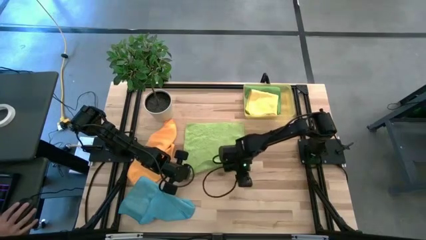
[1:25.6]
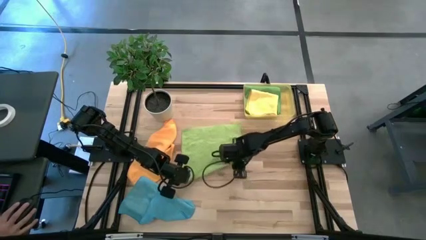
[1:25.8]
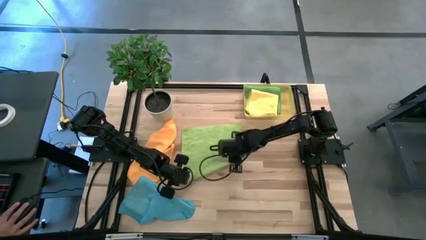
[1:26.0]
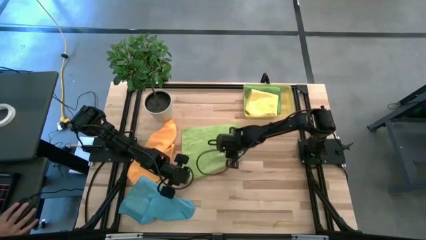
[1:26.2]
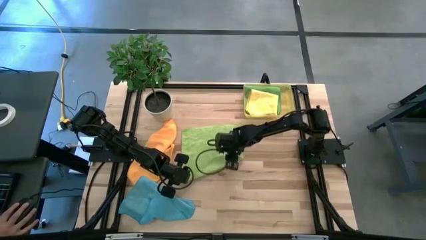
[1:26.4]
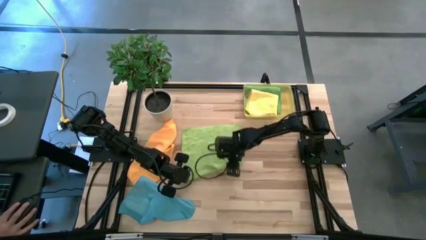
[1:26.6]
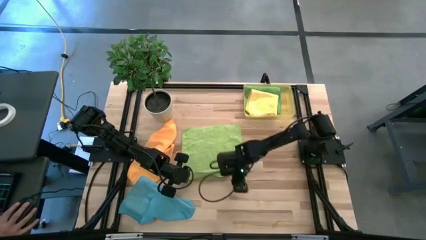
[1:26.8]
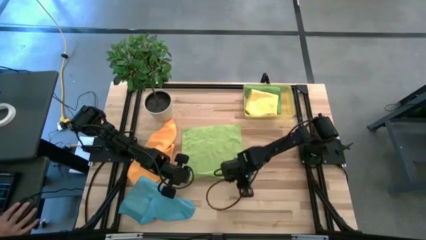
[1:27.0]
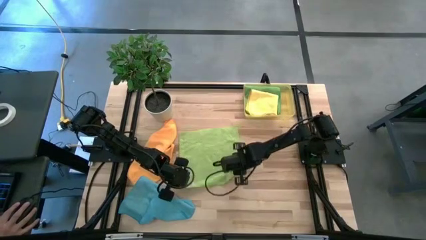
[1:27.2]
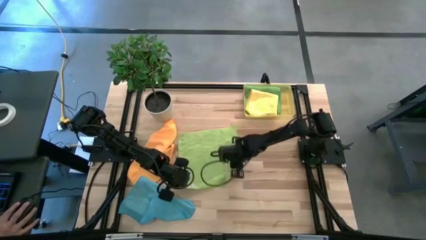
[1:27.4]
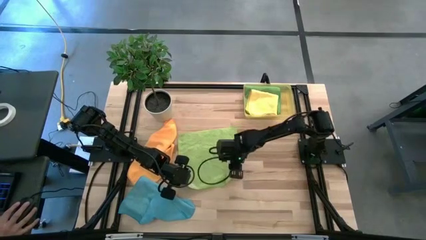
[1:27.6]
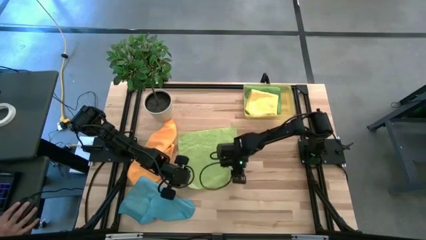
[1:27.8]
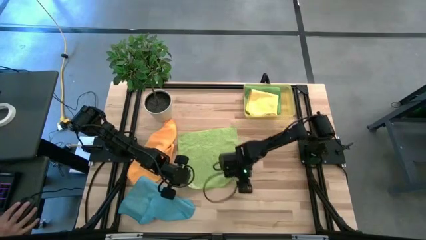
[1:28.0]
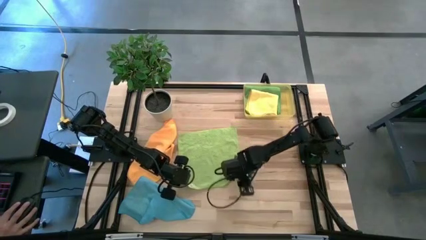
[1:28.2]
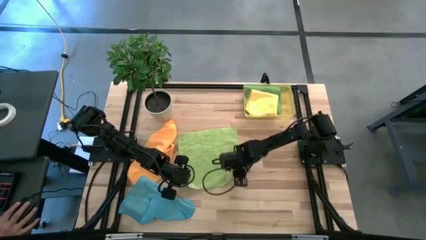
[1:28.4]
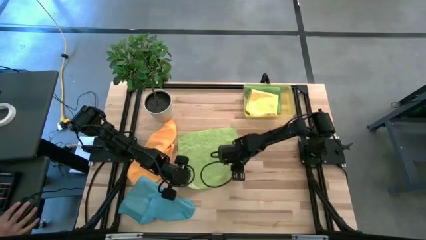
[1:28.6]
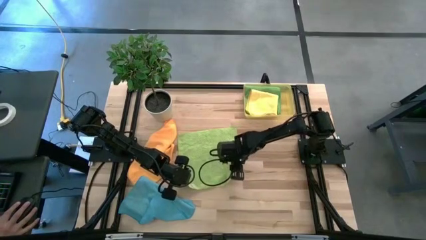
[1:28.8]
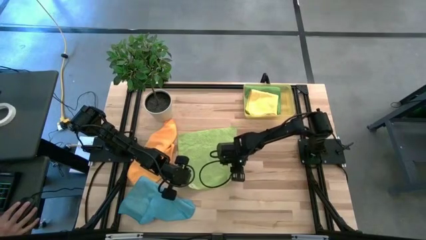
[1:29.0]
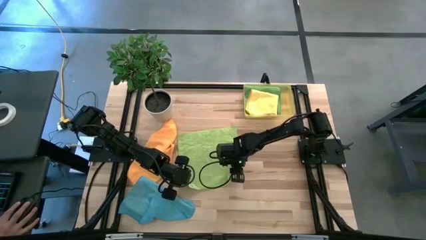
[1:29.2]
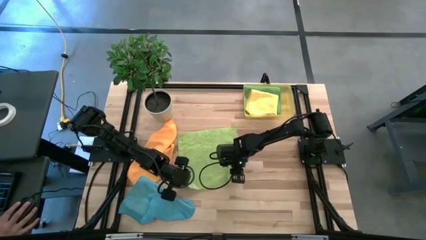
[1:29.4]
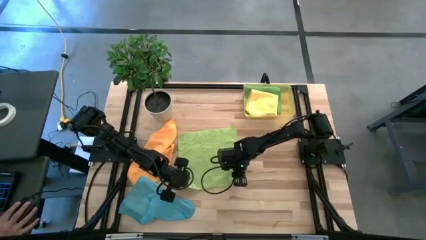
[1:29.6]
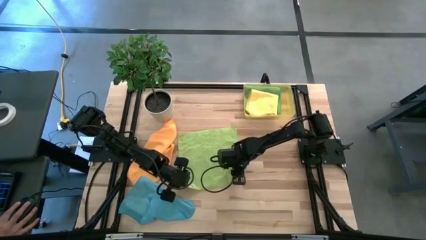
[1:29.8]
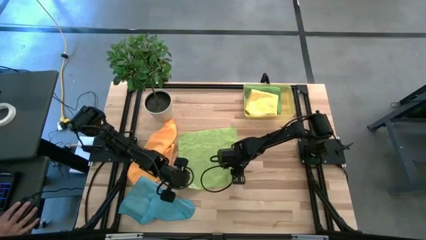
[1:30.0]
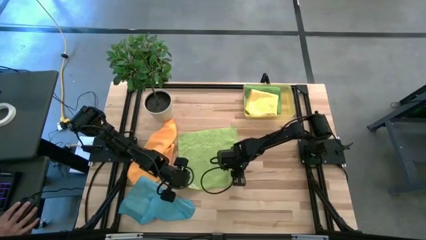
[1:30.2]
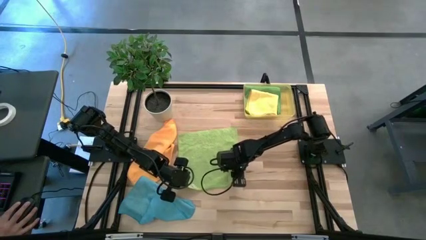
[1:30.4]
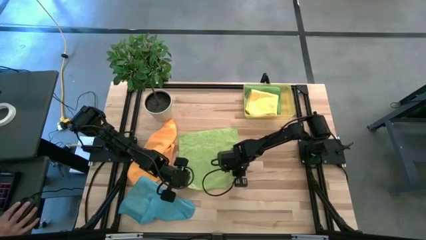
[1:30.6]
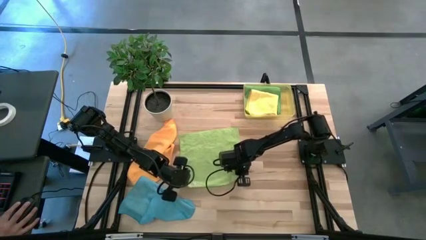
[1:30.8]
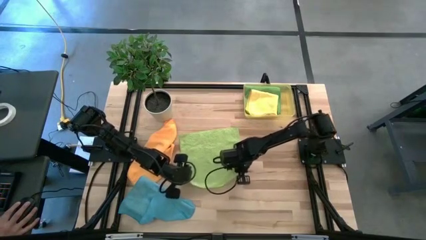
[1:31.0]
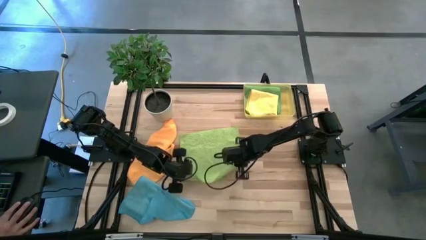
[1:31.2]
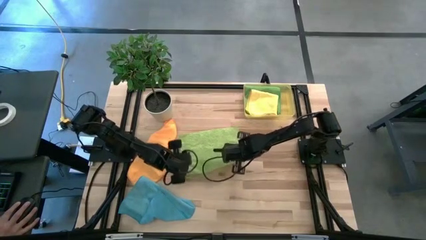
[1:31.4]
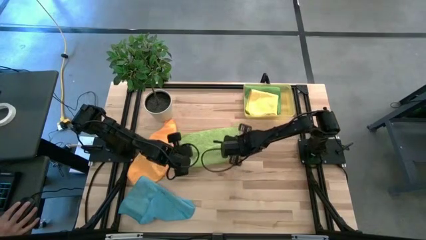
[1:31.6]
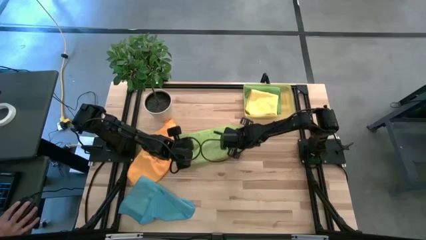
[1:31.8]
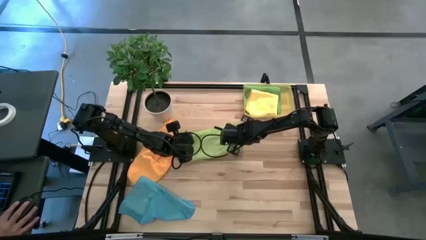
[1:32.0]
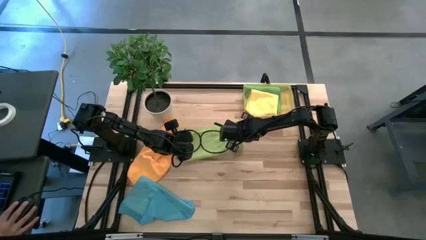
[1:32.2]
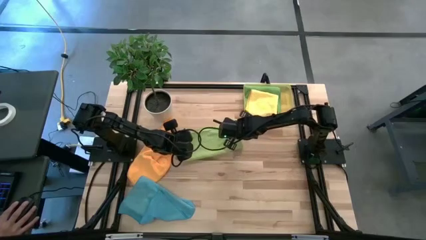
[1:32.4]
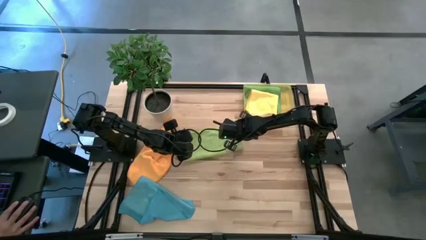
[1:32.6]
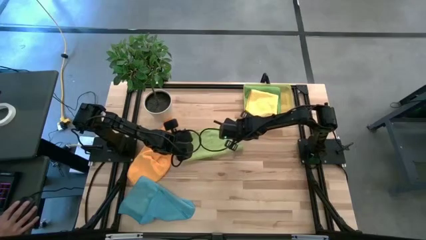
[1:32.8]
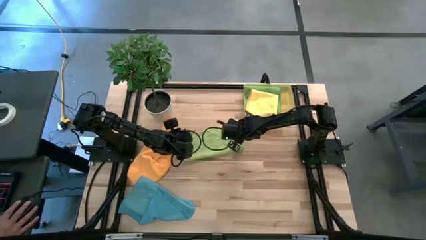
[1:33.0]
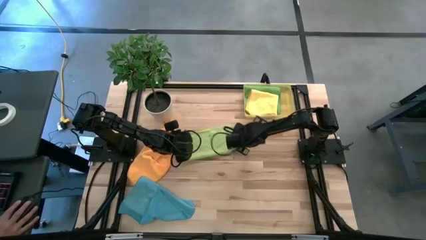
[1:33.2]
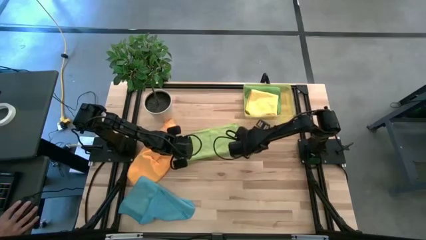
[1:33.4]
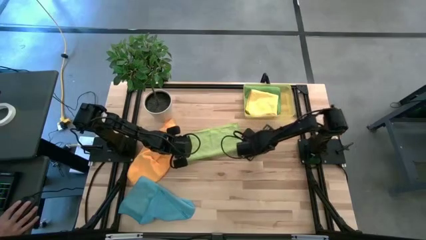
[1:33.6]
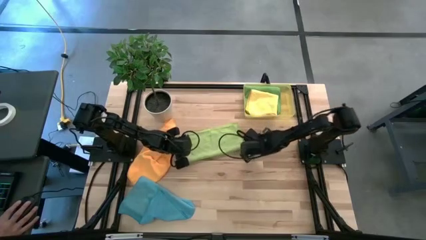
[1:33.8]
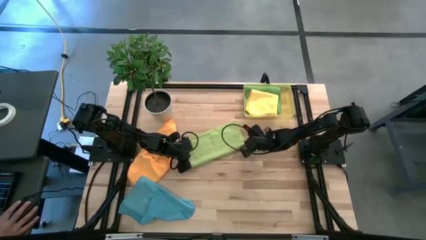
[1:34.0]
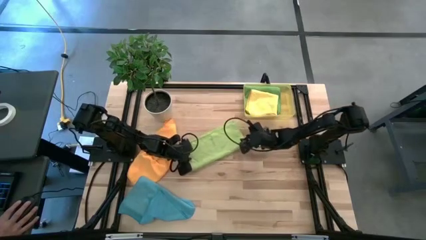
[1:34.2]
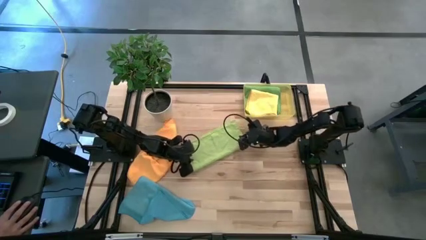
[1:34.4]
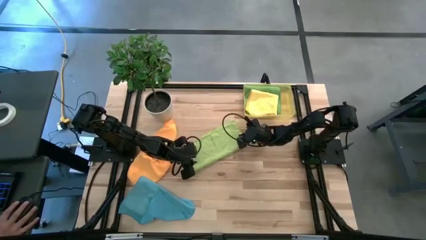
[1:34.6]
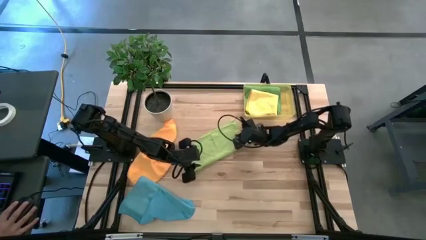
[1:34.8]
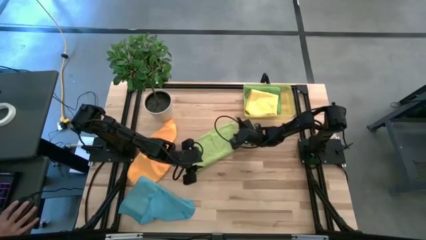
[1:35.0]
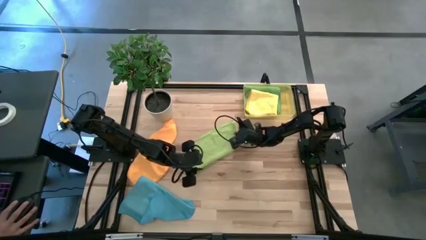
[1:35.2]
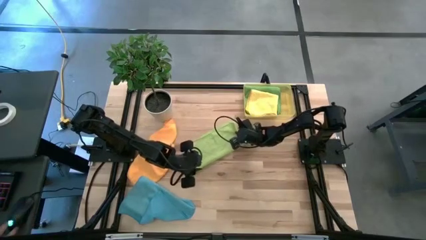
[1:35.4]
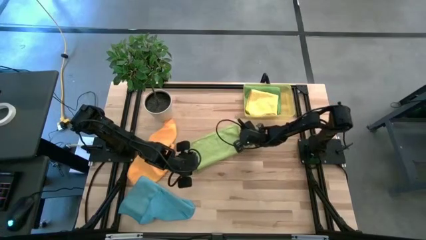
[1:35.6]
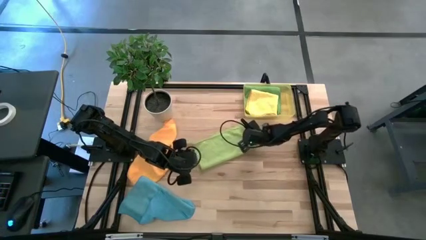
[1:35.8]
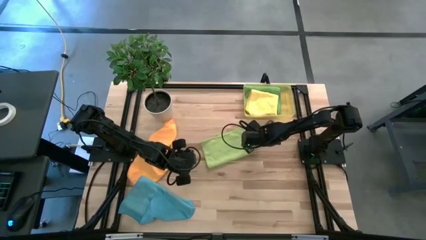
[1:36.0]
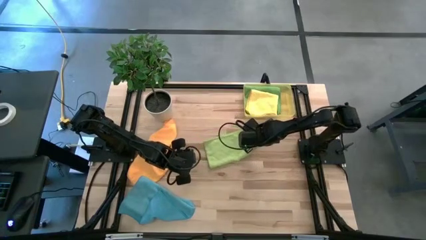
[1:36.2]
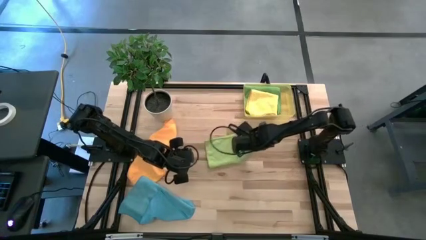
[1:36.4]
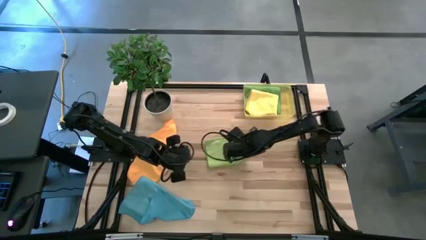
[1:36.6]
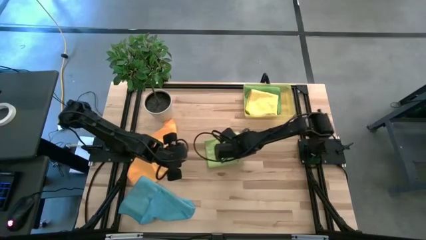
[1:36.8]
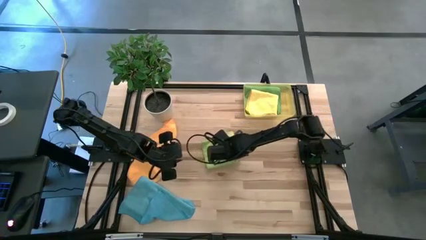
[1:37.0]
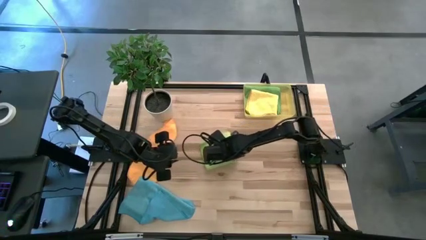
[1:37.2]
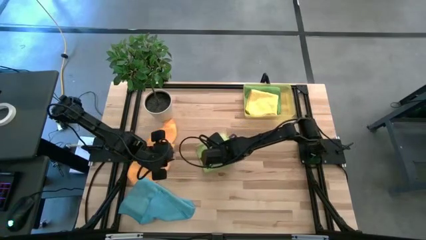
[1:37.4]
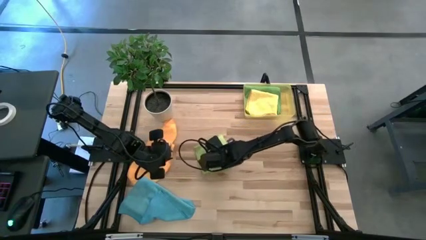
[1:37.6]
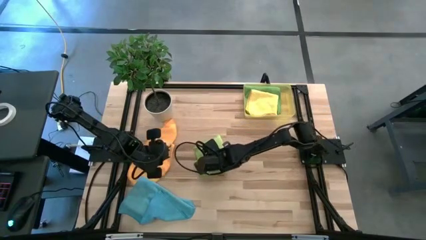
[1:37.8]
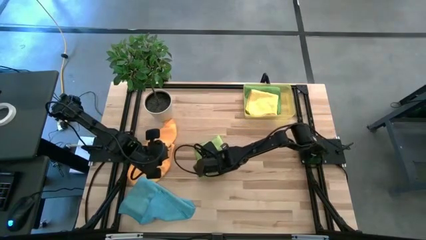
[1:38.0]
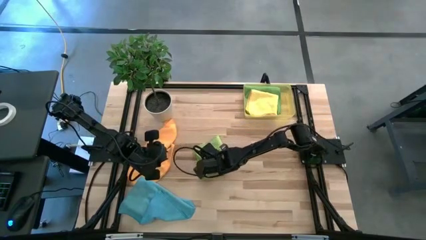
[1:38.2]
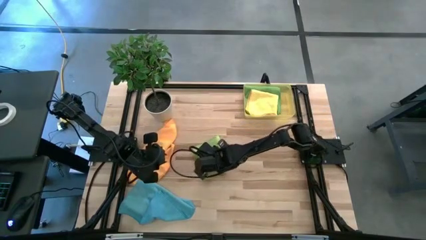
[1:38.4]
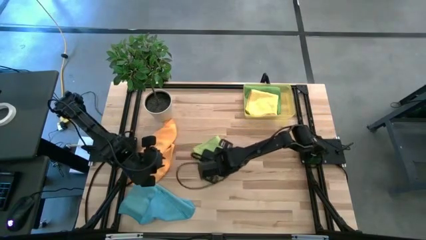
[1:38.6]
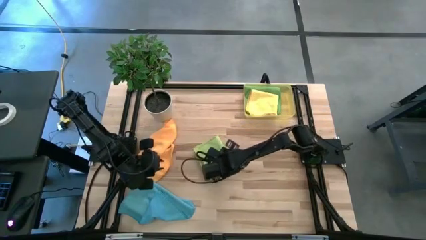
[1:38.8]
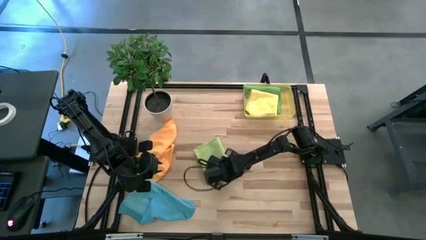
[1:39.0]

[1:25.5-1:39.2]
Task: Fold microfiber towels
Fold the light green microfiber towel

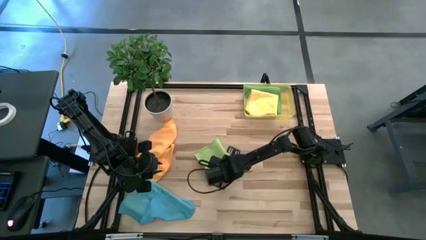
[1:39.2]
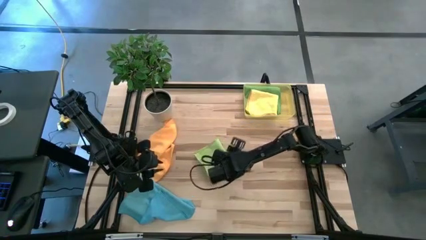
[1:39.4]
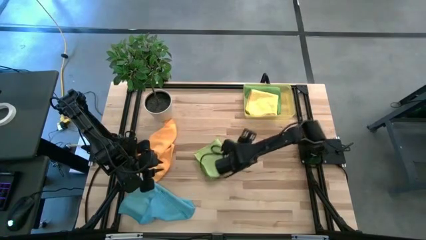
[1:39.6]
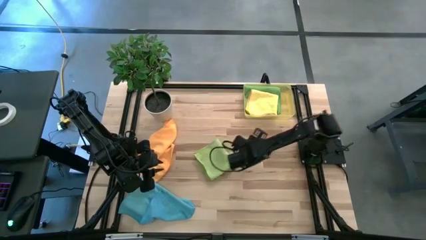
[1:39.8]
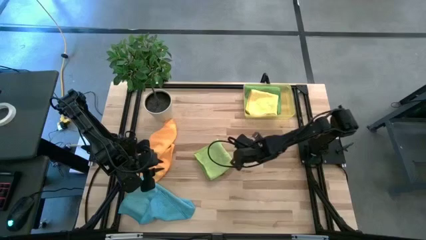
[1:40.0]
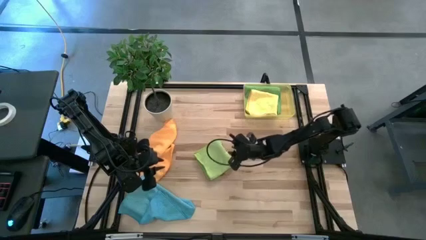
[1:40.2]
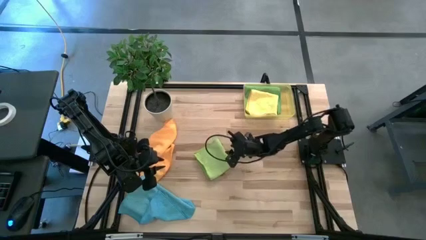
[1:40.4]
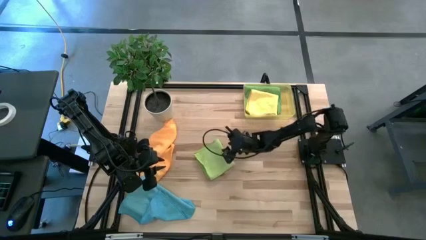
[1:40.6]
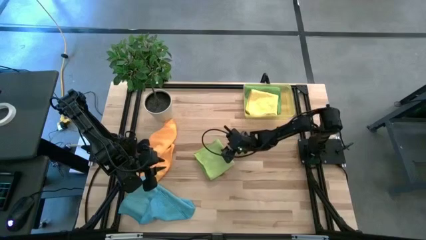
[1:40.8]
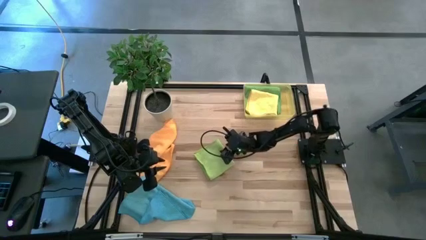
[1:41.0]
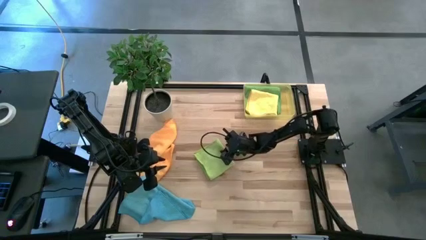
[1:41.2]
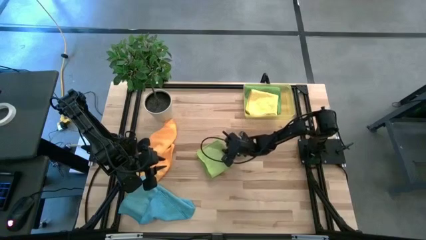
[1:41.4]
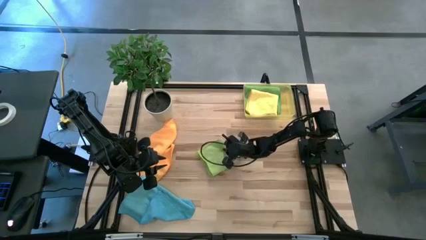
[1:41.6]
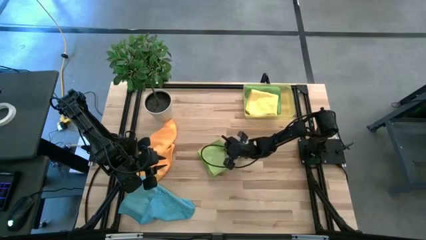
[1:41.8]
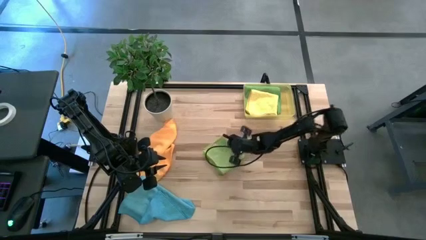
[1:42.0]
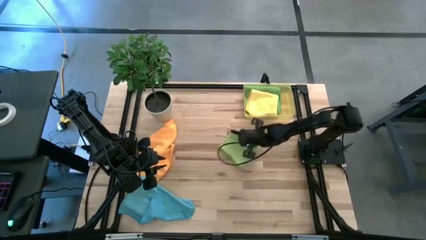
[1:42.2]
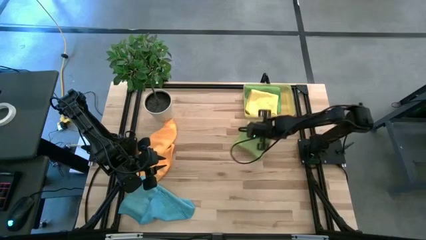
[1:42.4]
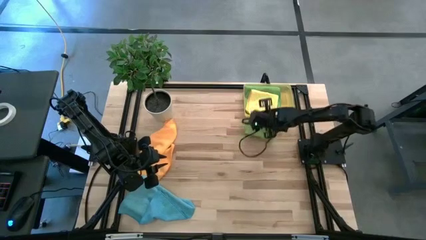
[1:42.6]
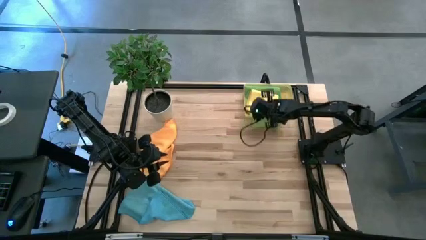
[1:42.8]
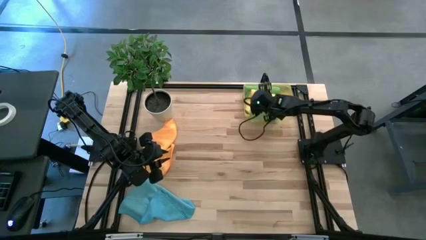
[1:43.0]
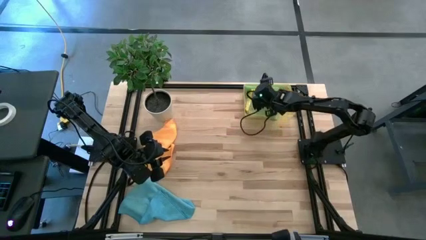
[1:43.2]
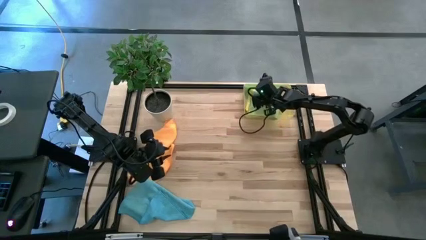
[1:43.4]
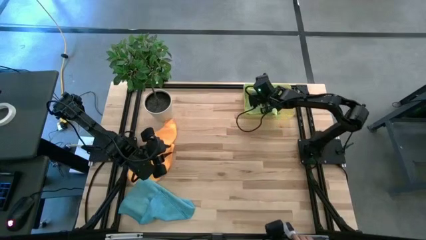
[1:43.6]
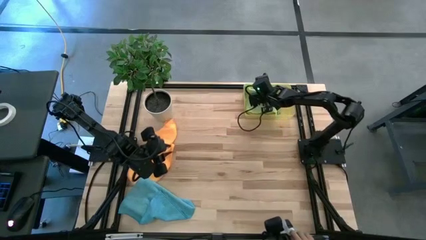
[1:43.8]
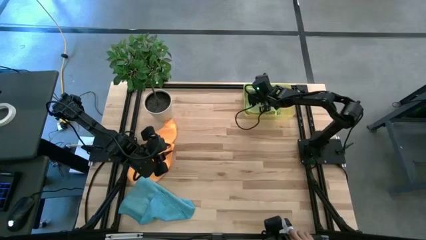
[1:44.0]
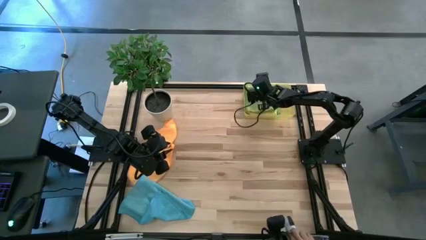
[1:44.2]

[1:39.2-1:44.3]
Put the light green microfiber towel into the yellow bin
